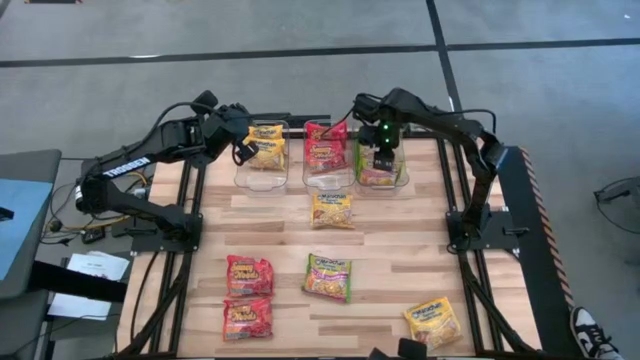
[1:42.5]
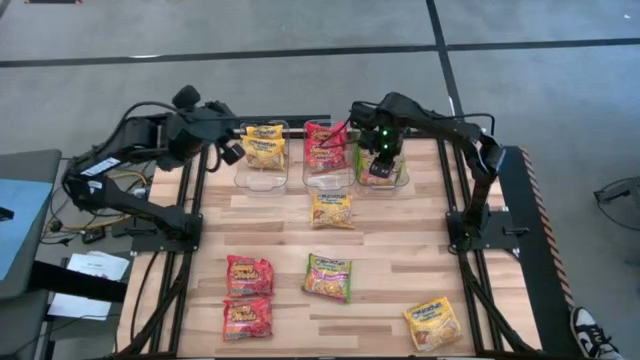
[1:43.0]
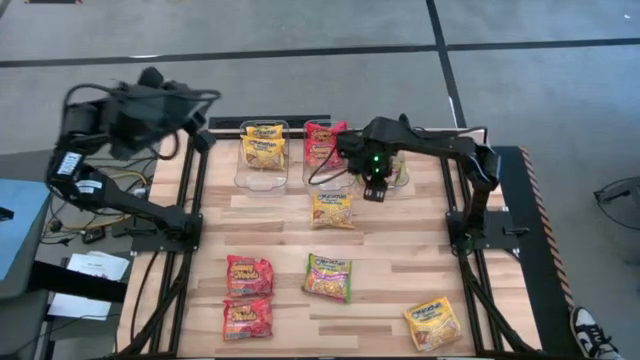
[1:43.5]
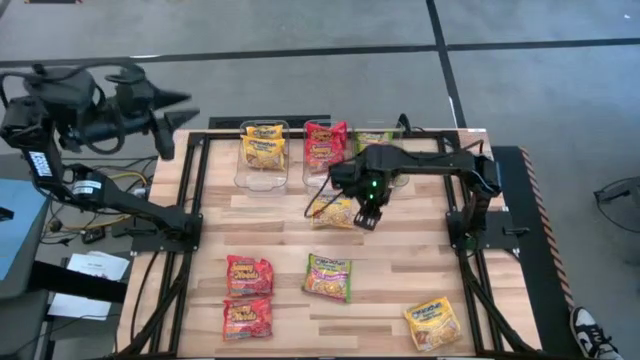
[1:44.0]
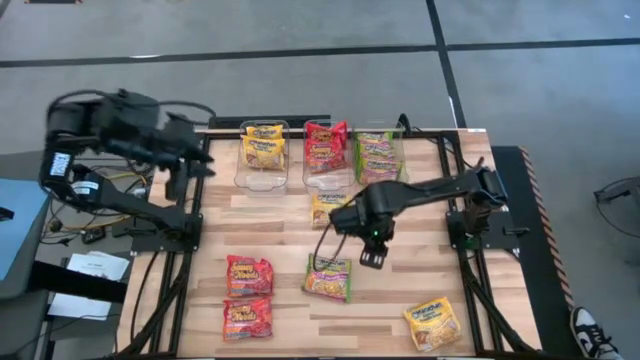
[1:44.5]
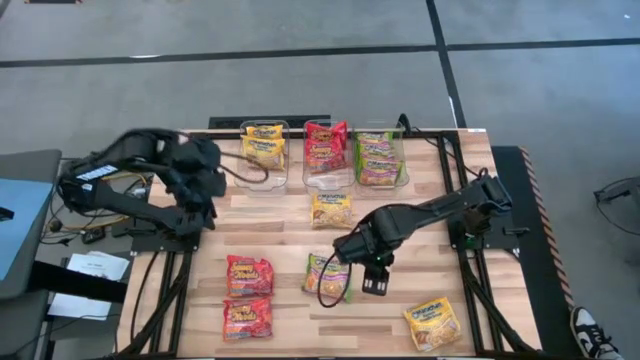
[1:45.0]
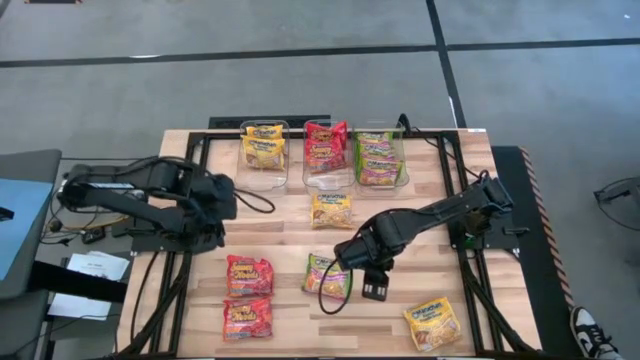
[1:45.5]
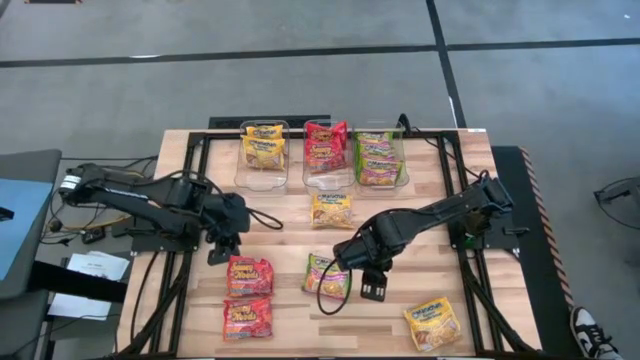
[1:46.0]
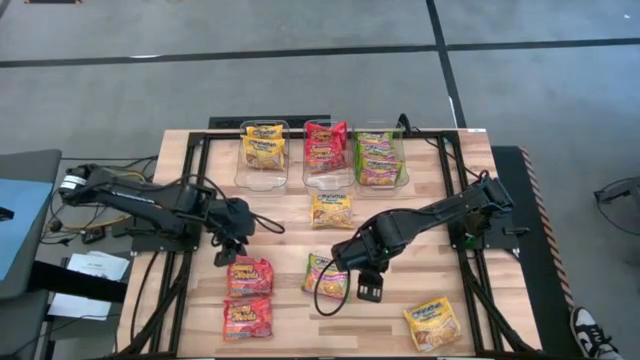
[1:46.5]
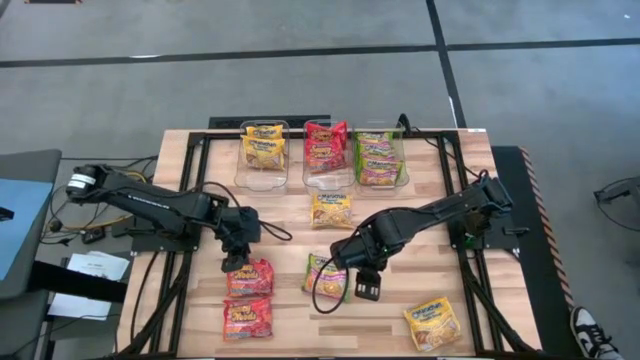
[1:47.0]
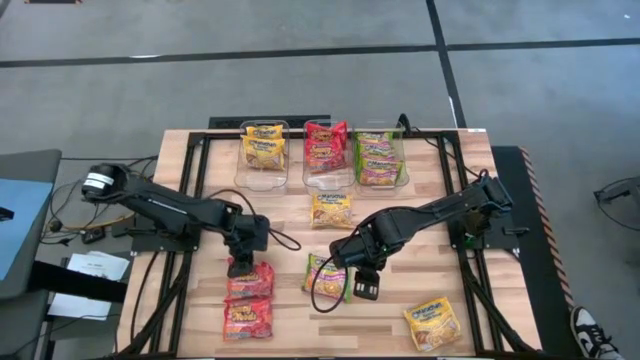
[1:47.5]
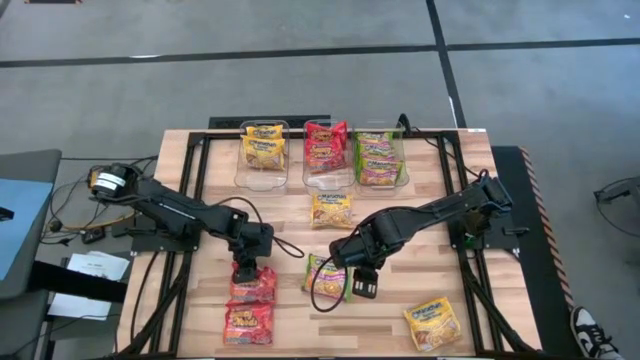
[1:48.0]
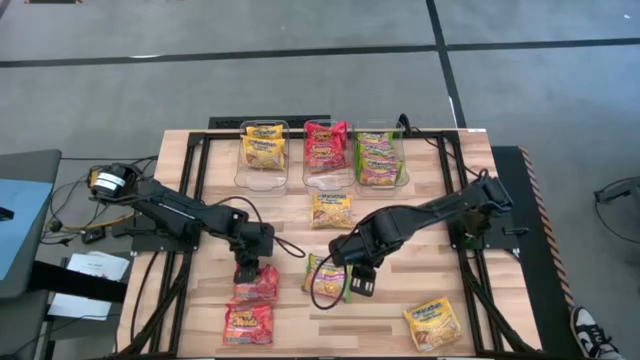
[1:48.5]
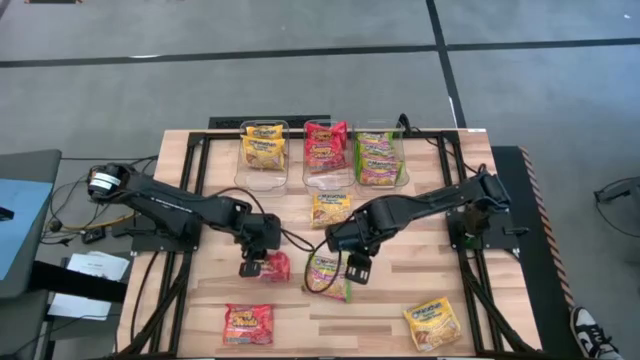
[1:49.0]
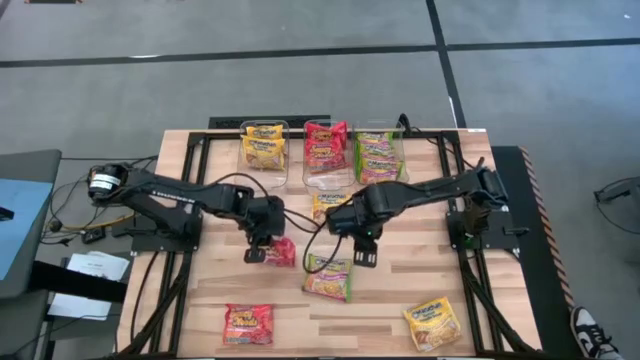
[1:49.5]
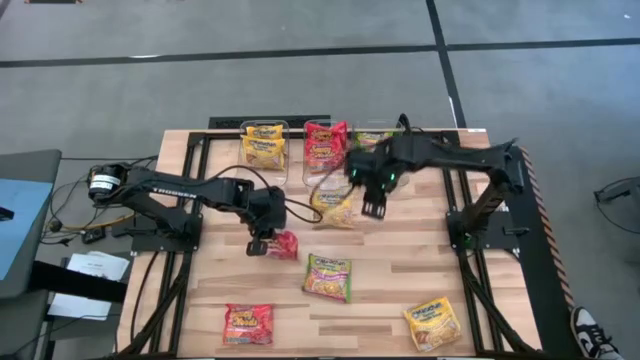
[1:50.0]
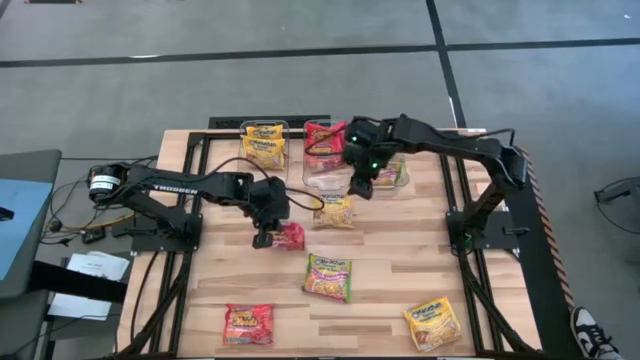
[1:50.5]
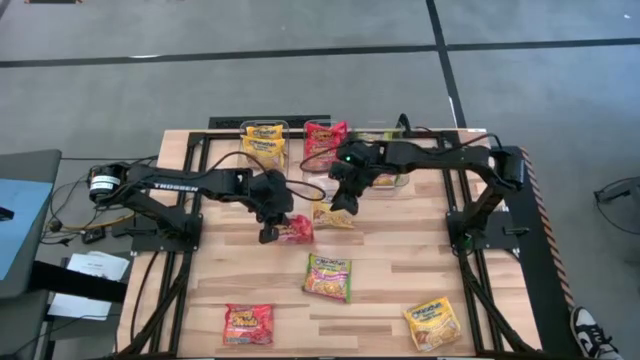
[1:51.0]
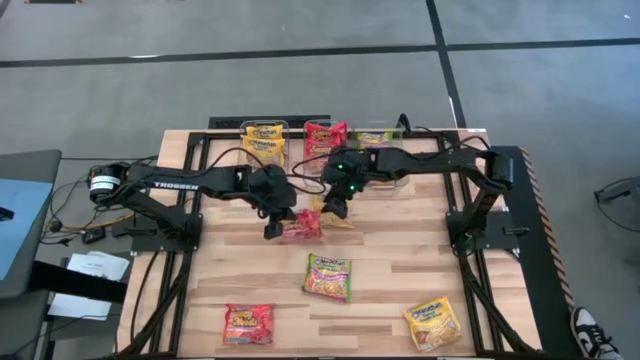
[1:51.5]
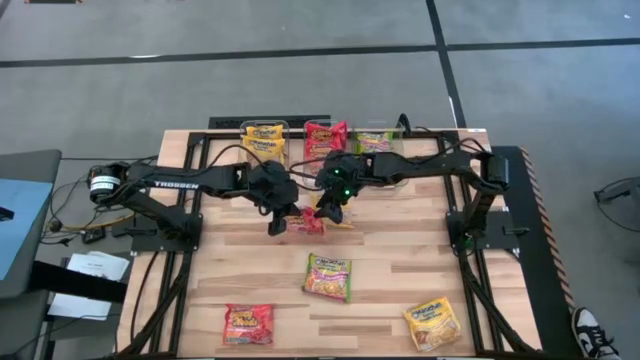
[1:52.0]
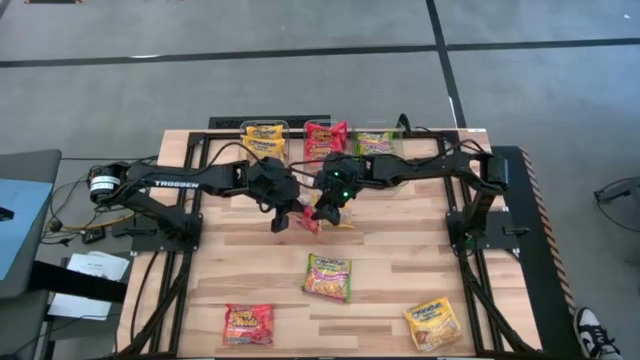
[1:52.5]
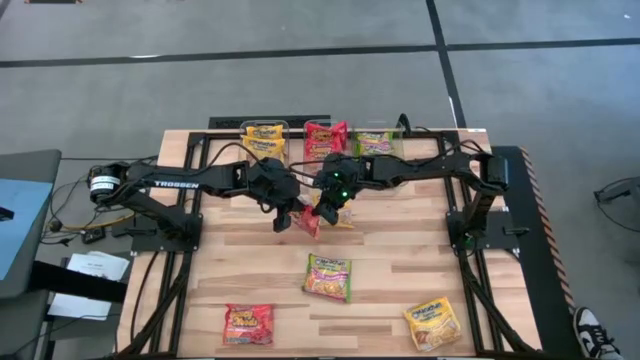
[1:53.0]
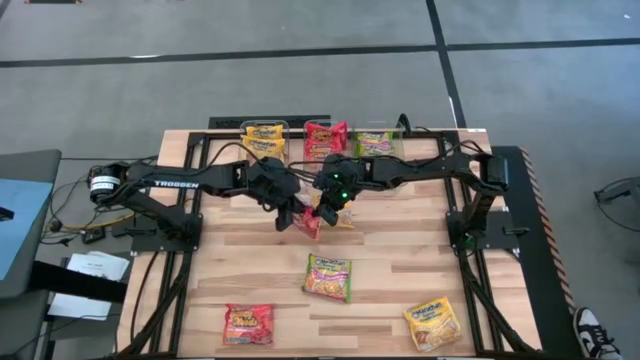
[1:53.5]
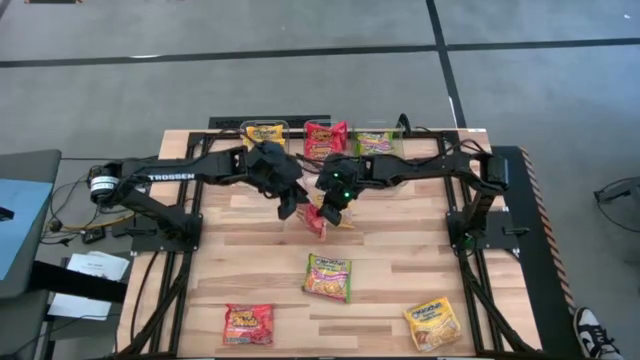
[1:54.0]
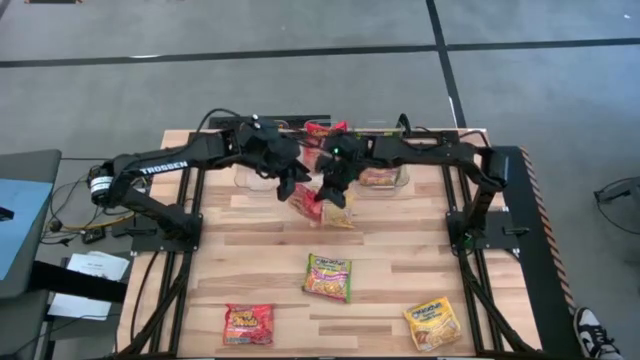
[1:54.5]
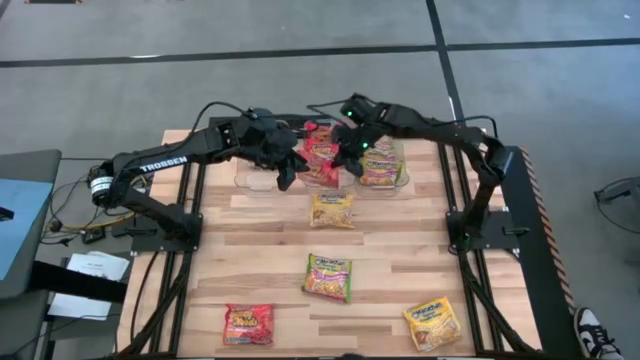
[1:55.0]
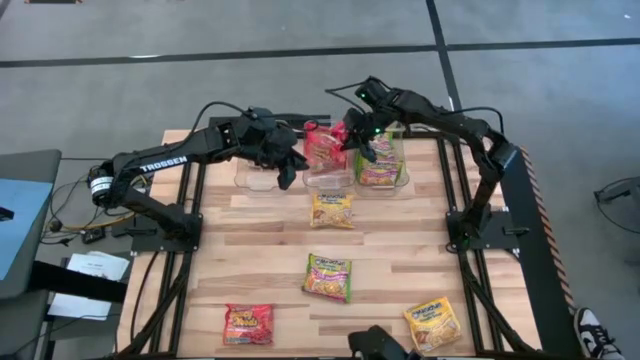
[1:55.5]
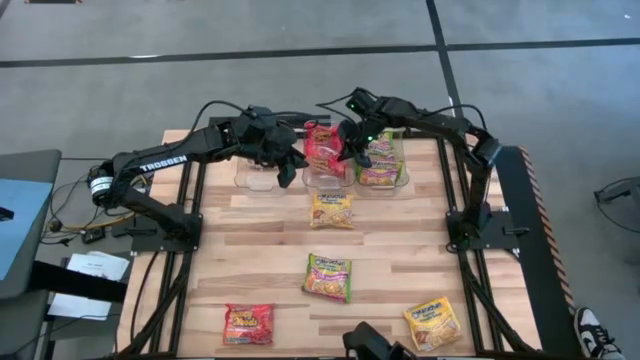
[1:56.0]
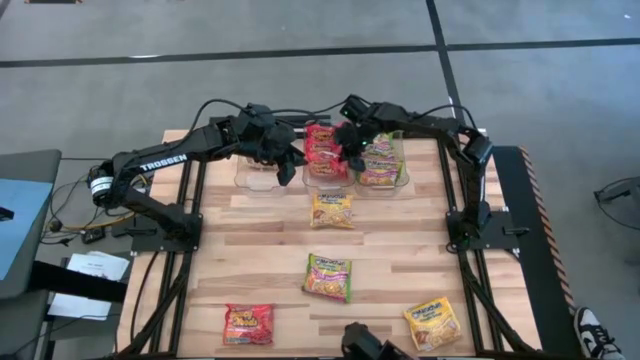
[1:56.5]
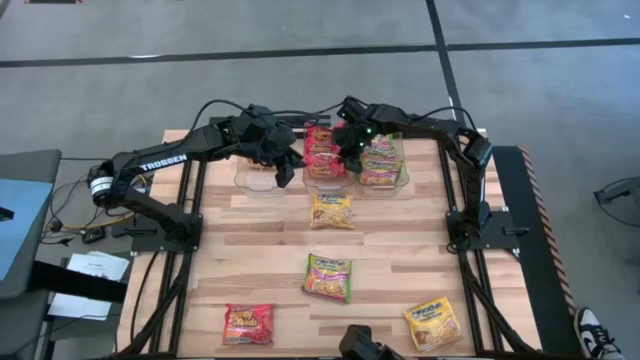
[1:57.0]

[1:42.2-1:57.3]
Task: Sort Maruchan noodles
Put the orange noodle pack into the middle transparent bin

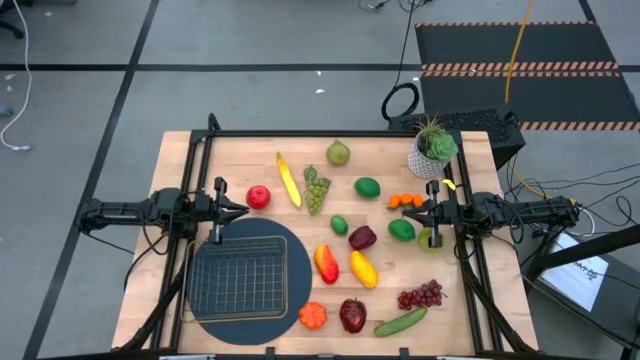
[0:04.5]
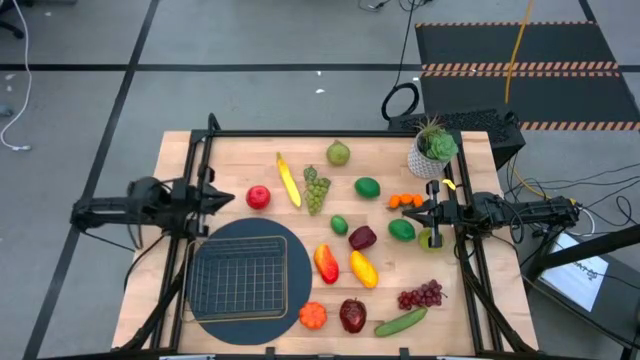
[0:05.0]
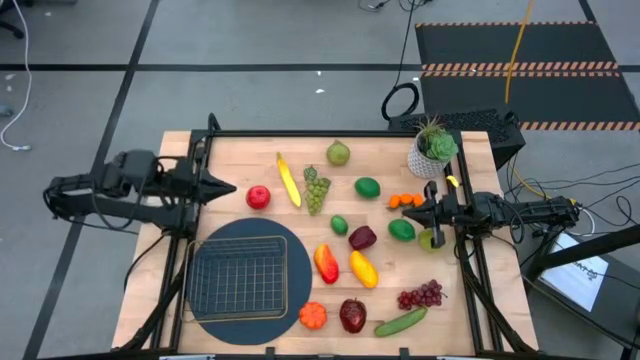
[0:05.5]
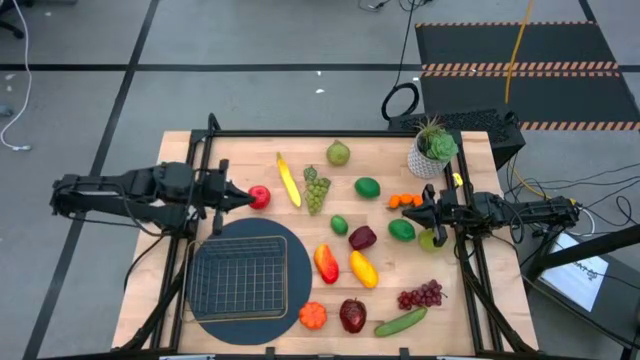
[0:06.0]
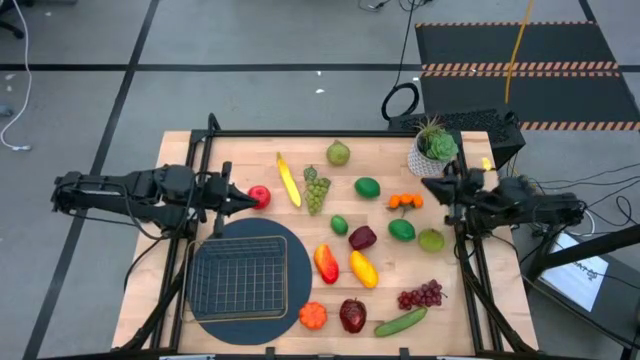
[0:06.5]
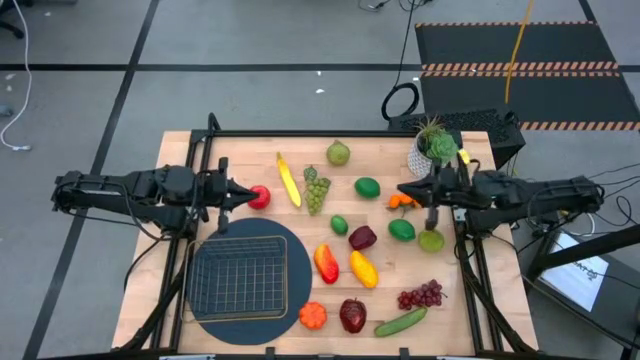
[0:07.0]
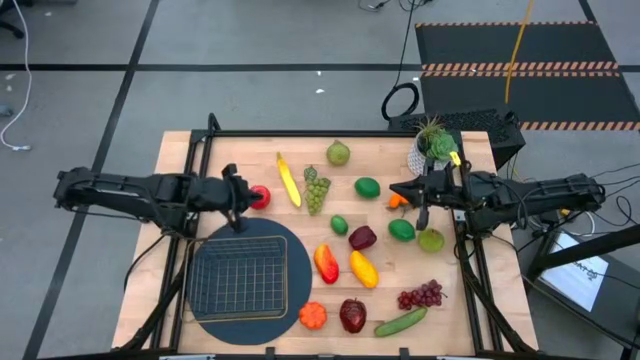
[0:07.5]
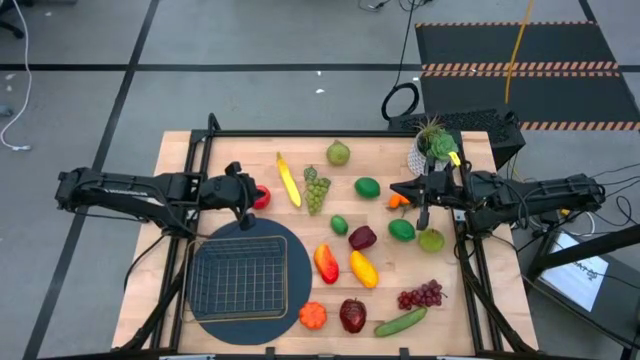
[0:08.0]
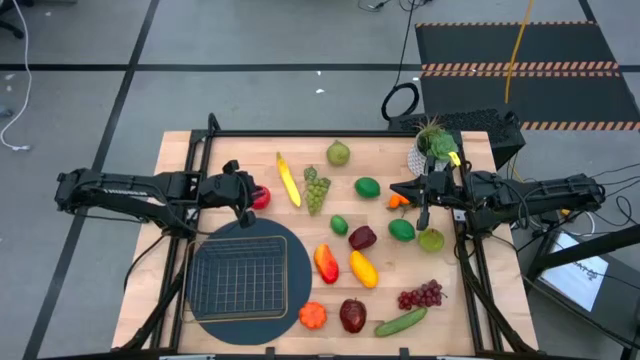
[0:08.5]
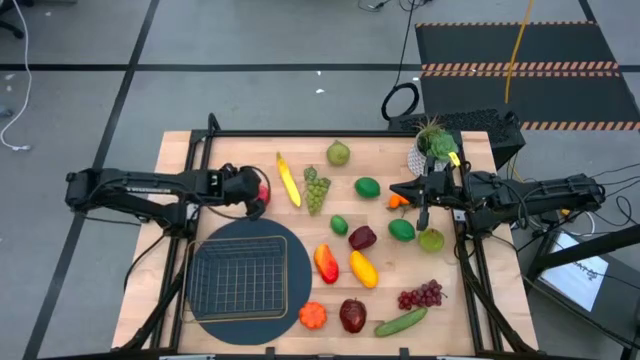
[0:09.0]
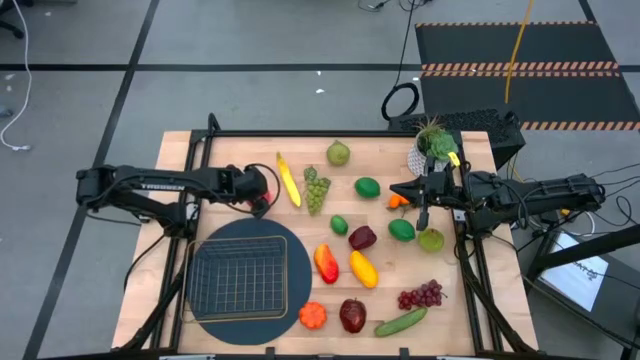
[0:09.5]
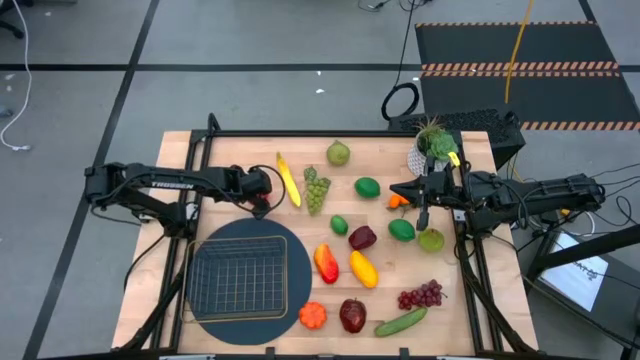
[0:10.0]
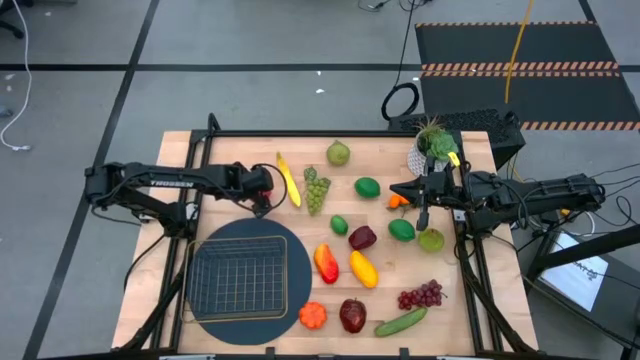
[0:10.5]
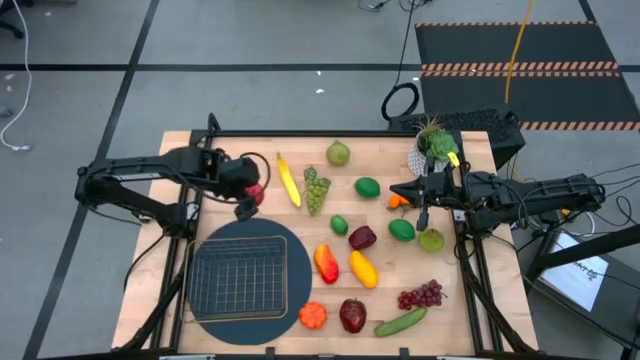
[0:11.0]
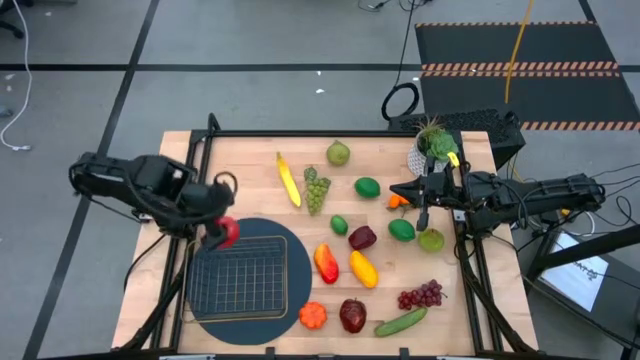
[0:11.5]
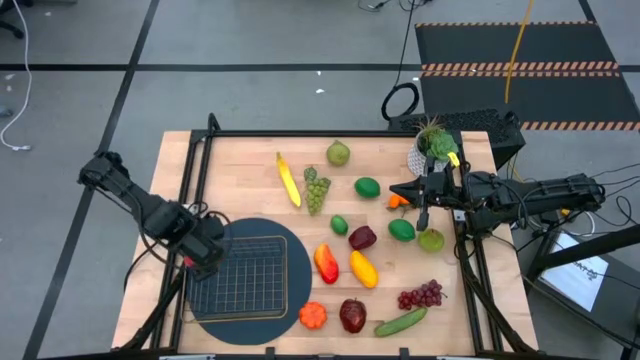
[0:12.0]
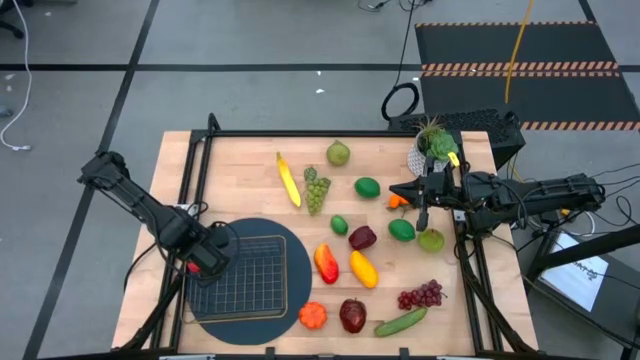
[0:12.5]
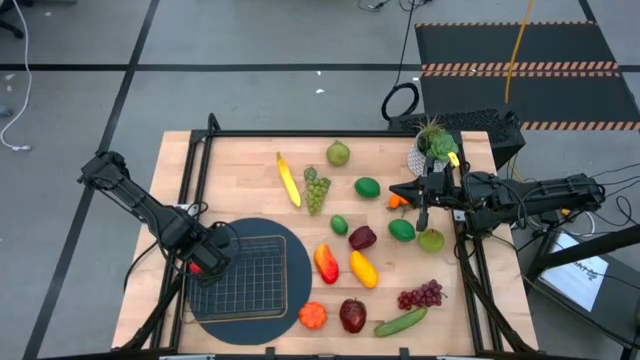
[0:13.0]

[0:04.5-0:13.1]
Task: Build produce basket
Put the red apple into the gold wire basket
